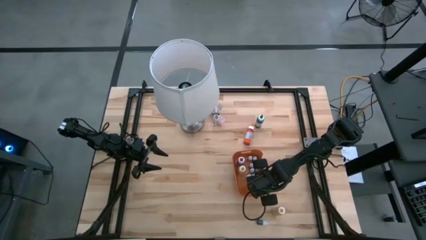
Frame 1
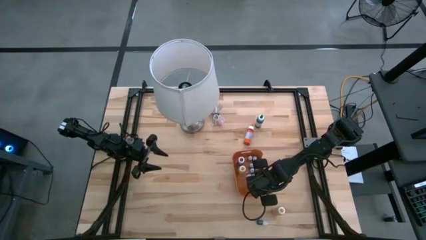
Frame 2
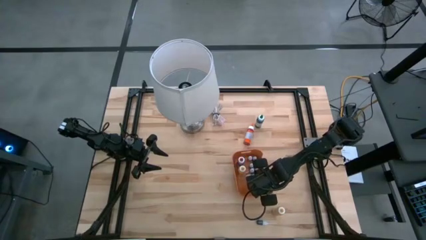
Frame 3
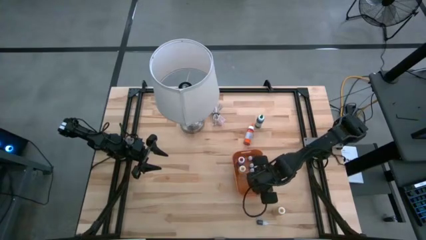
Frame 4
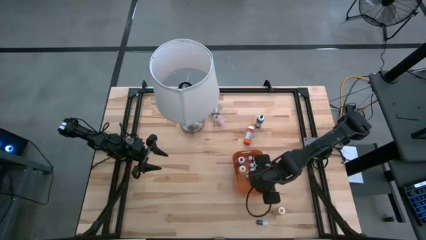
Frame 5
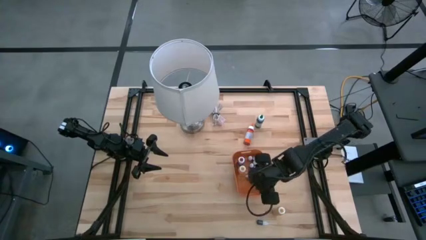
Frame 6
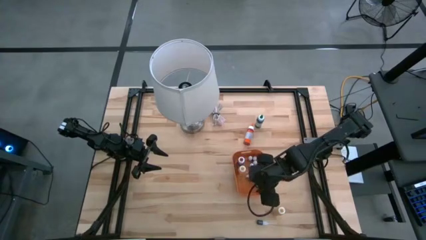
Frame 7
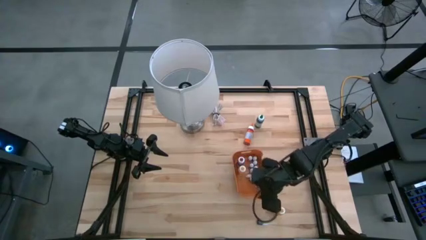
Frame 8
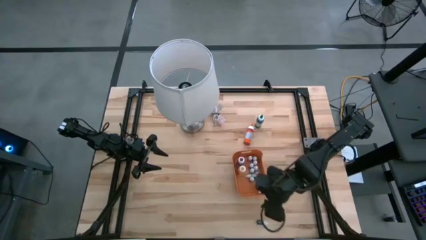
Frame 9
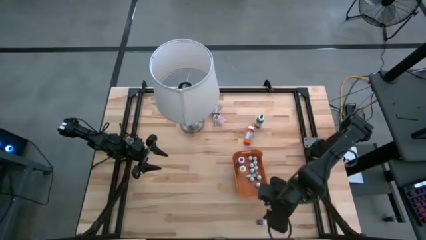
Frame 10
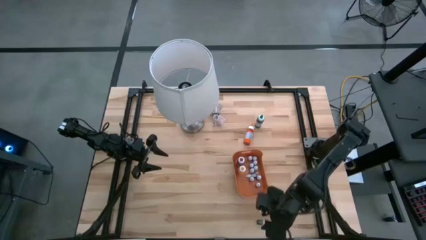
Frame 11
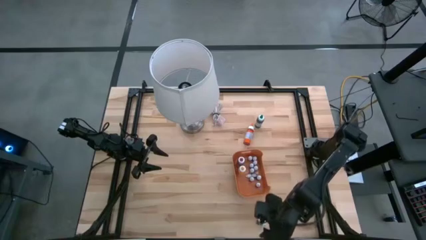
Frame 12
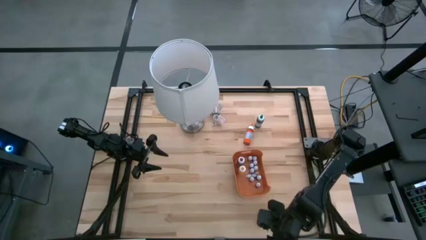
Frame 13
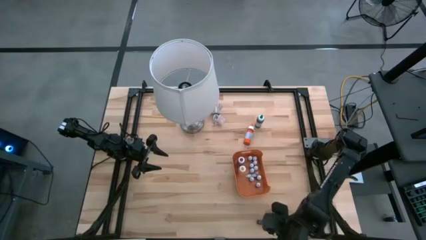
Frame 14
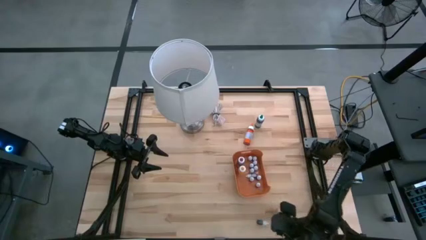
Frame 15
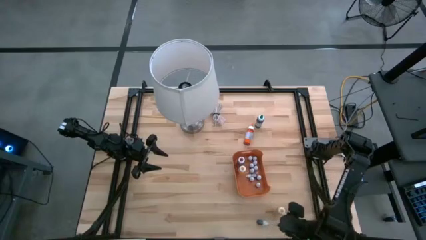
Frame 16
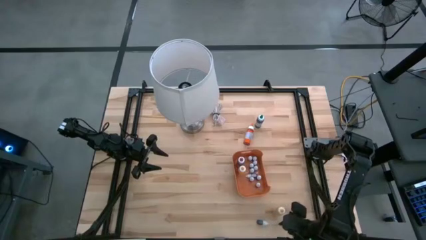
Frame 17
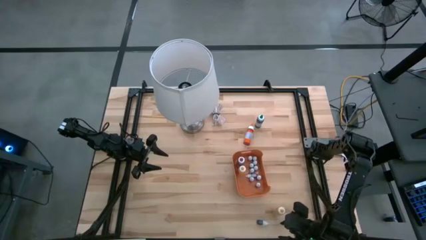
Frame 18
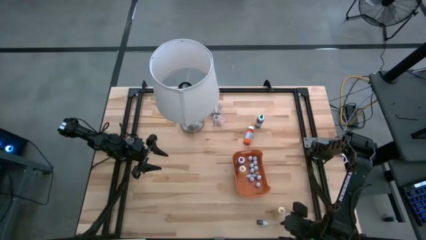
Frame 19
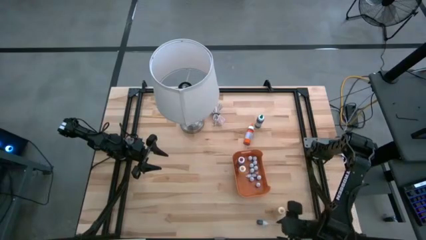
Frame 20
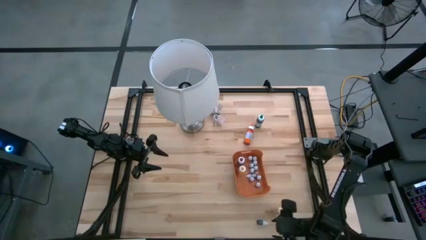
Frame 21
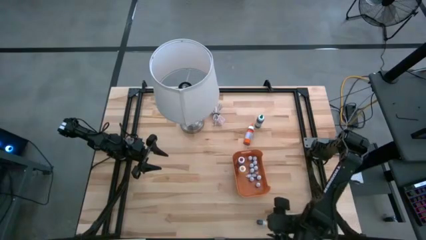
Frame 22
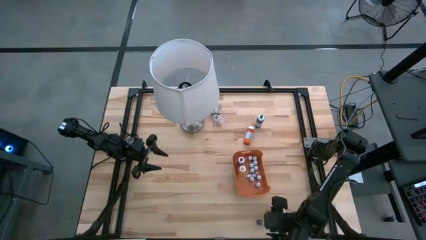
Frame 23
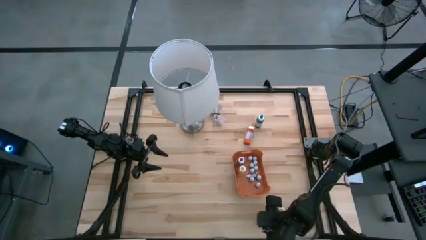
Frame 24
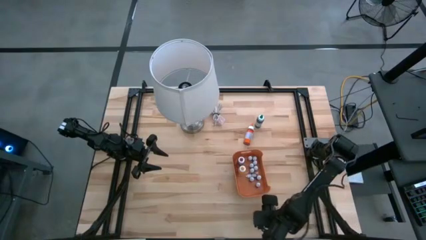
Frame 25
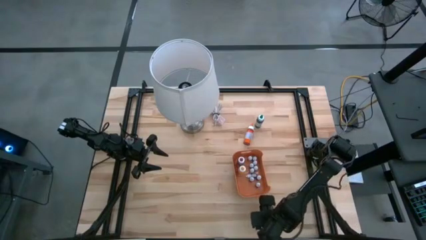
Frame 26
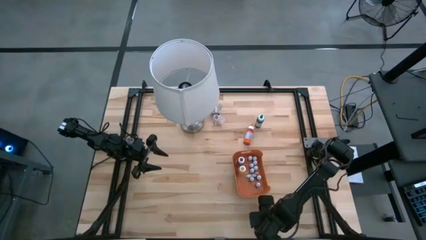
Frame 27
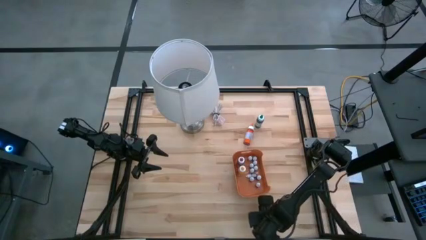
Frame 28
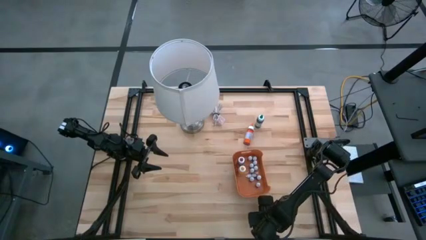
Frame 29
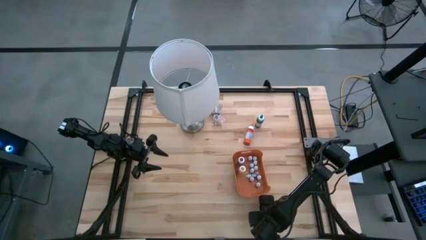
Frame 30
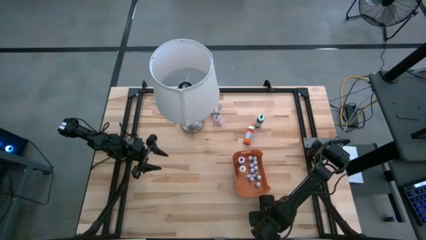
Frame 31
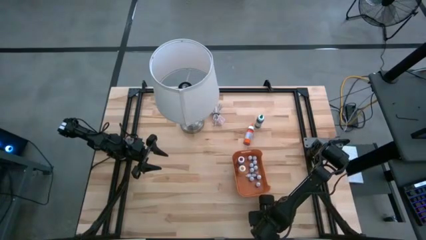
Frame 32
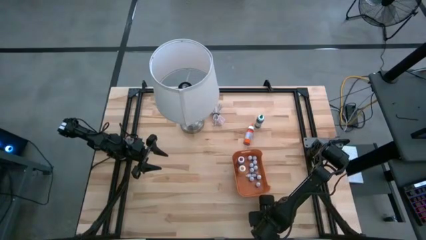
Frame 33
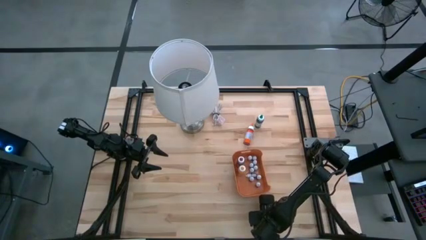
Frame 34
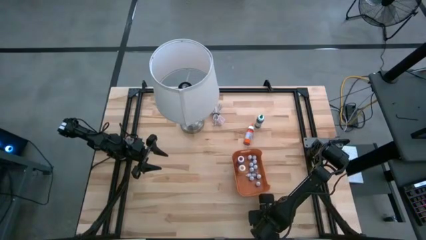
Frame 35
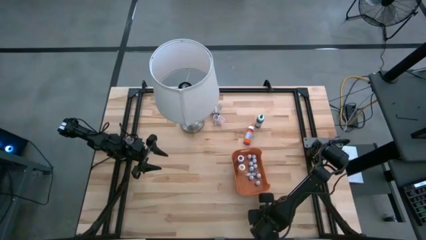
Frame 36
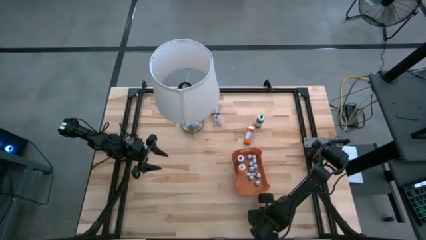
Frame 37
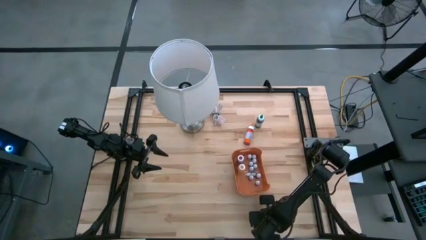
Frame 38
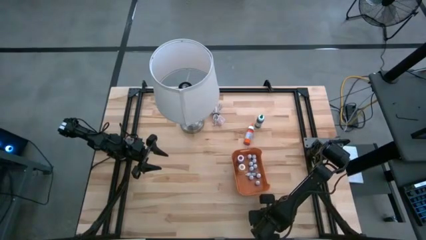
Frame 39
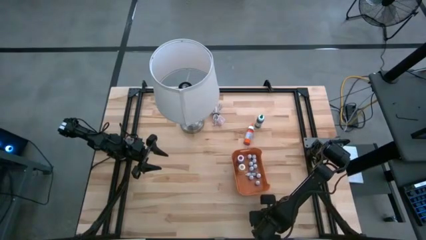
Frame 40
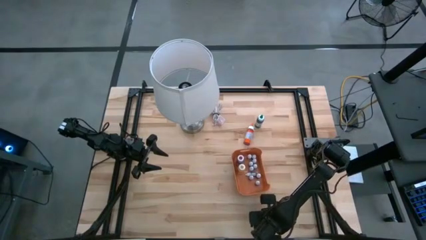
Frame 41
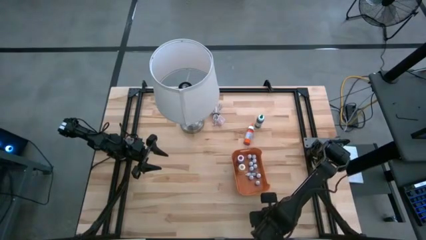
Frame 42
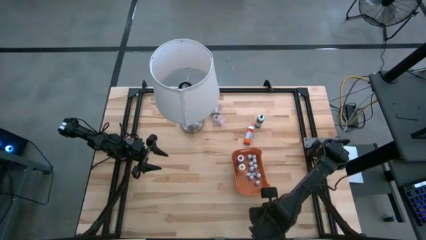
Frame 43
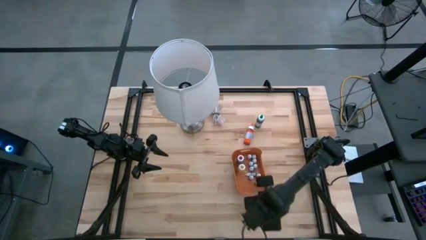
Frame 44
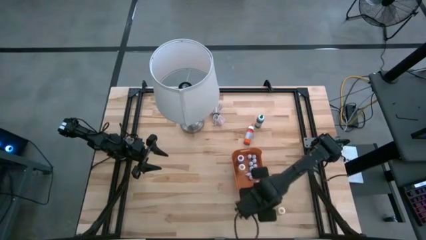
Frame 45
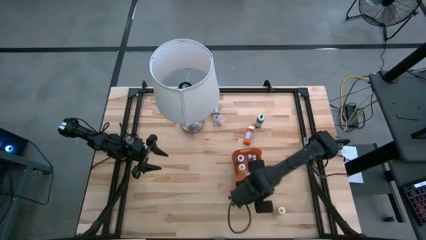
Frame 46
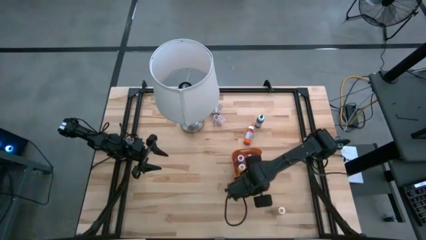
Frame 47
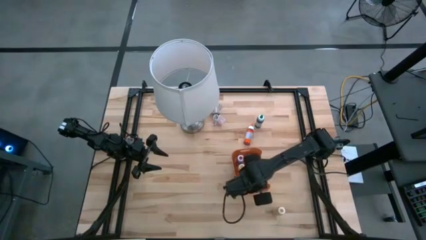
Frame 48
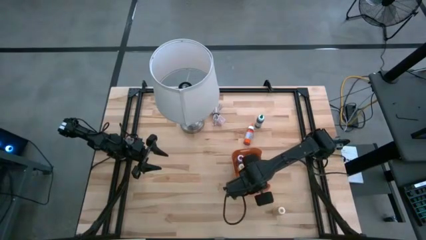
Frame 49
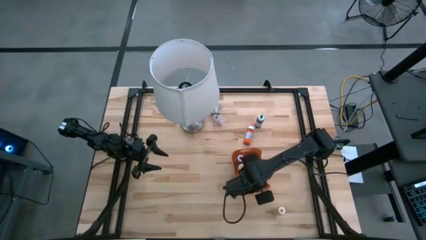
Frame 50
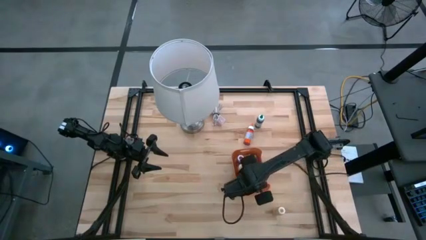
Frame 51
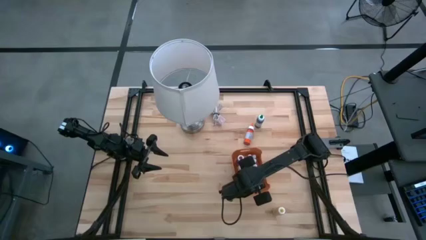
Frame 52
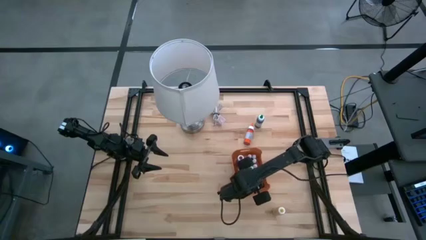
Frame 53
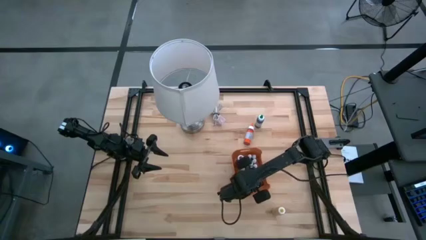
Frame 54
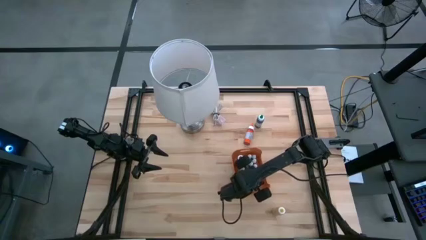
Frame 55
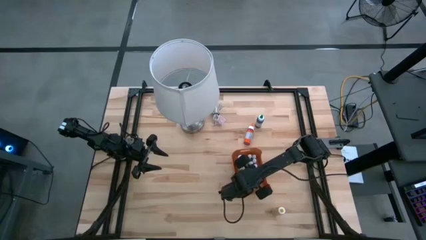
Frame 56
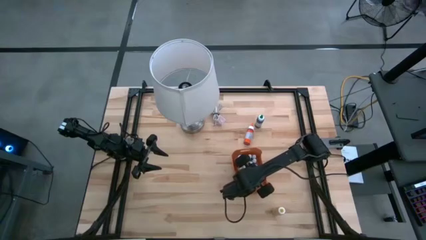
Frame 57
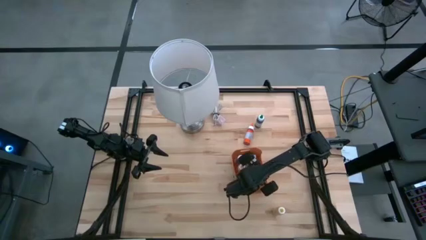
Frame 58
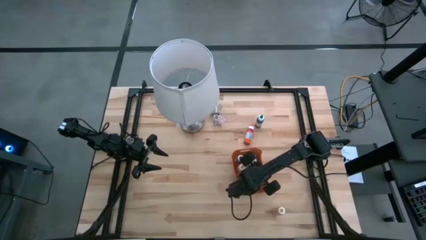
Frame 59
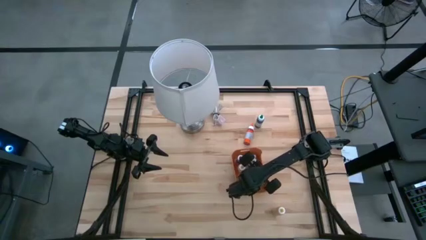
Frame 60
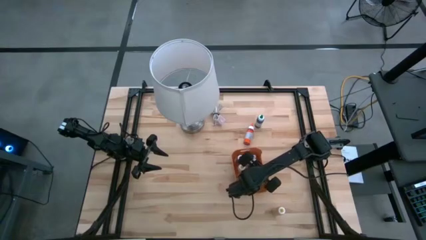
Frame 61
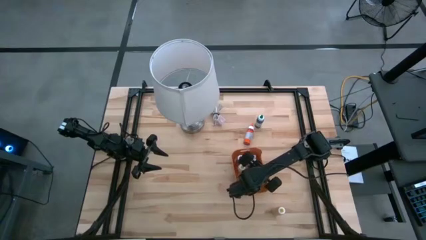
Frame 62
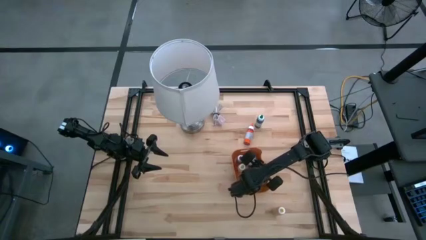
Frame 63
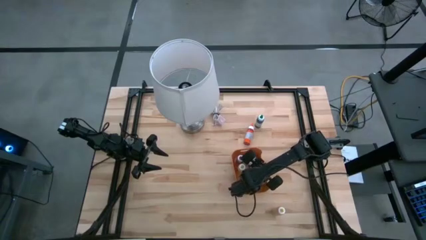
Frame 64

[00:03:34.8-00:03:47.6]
Task: Pick & Place food coloring
Put the small food coloring bottle into the orange bin
